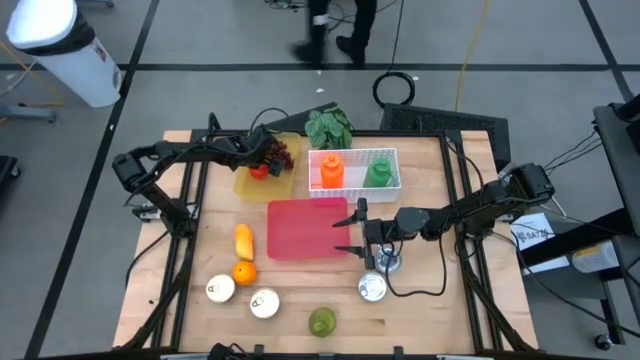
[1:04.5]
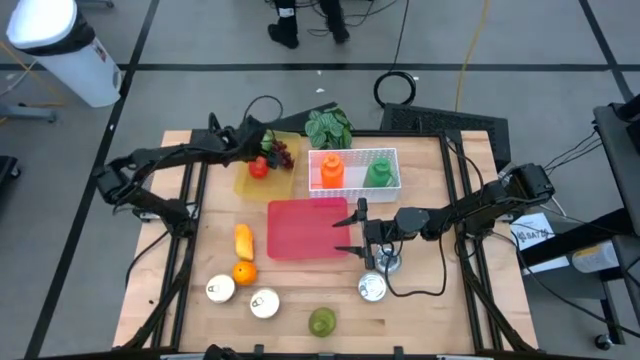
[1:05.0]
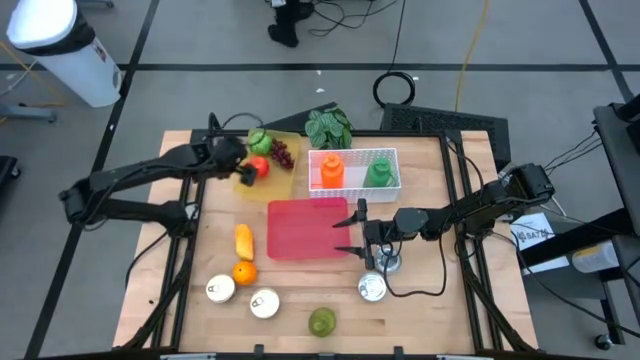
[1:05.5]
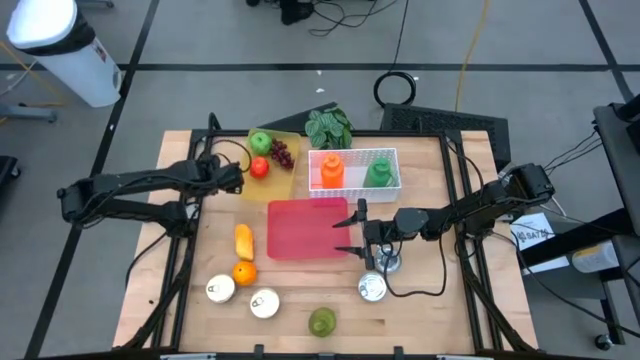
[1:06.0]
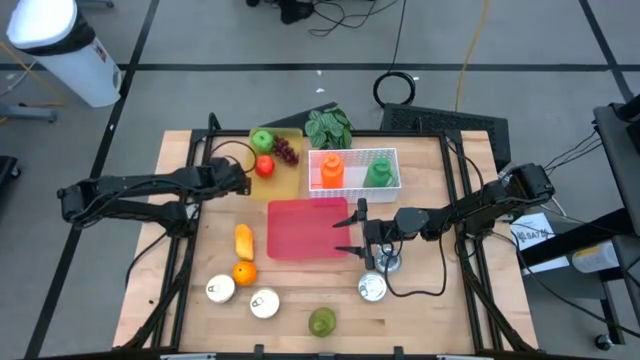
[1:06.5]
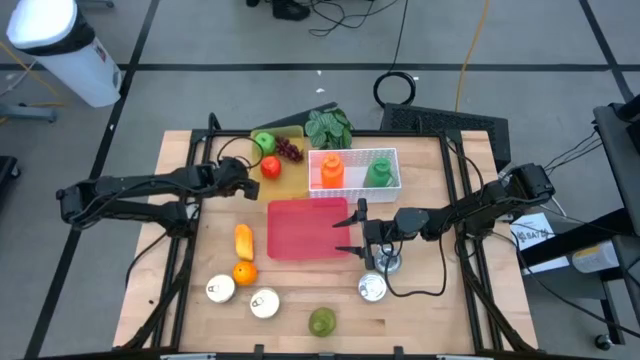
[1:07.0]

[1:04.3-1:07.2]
Task: Pick & Place Food Item
Adjust the yellow bin

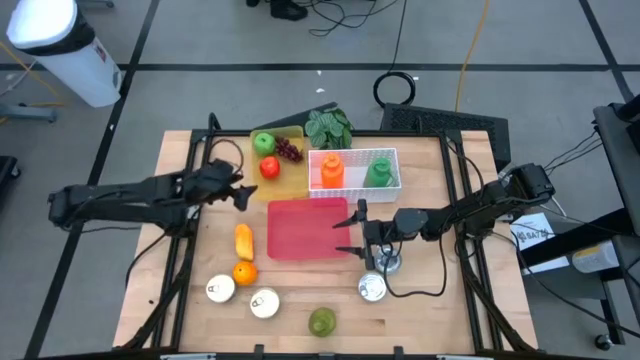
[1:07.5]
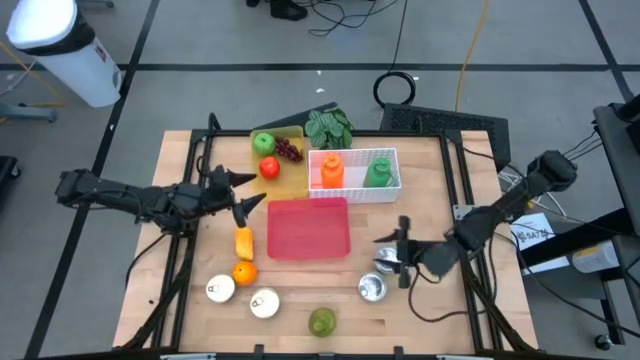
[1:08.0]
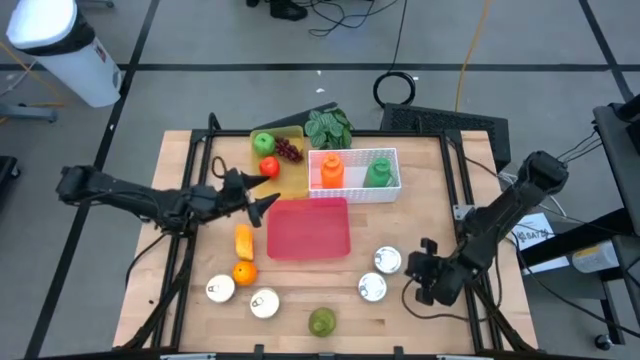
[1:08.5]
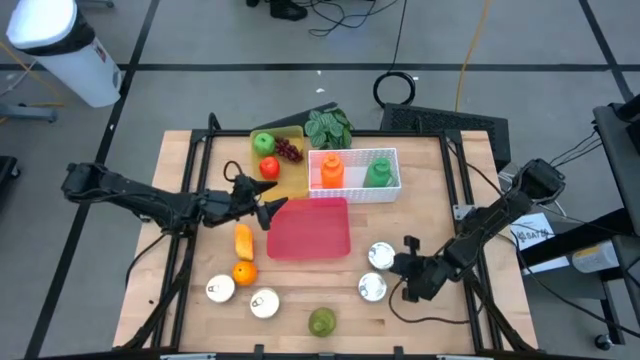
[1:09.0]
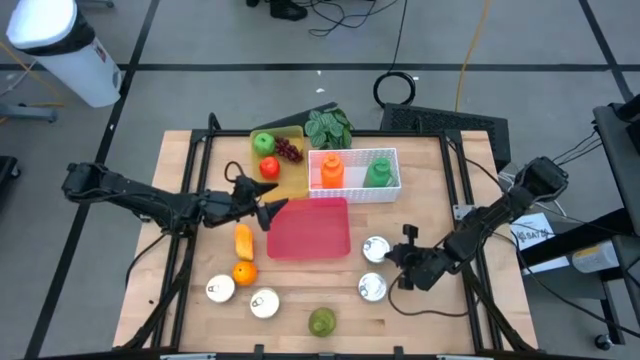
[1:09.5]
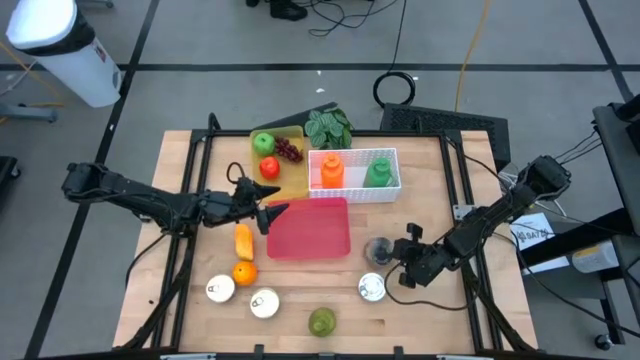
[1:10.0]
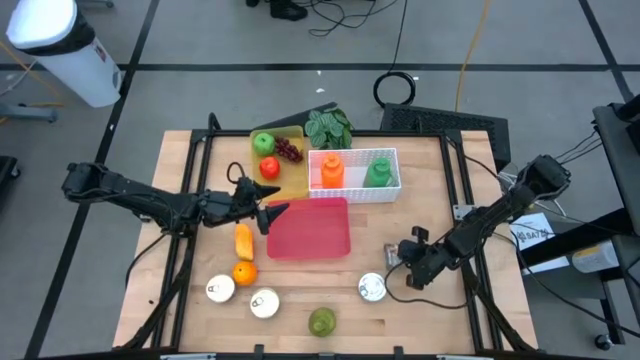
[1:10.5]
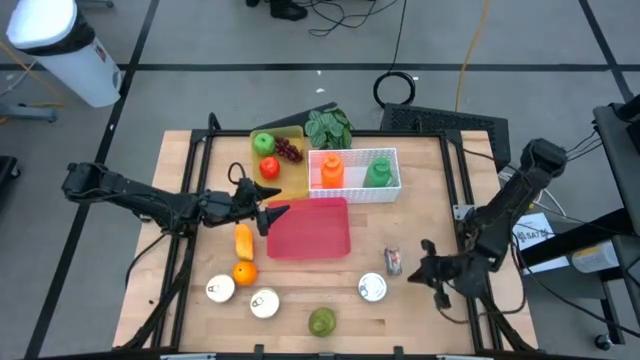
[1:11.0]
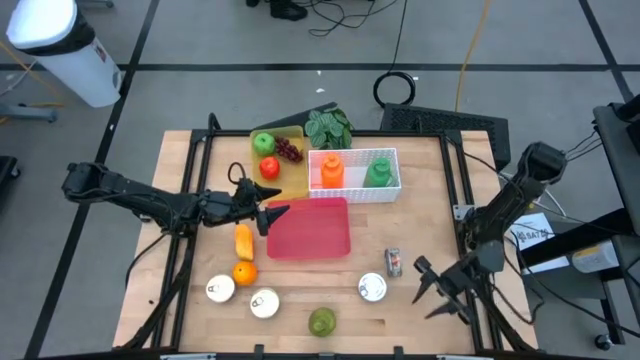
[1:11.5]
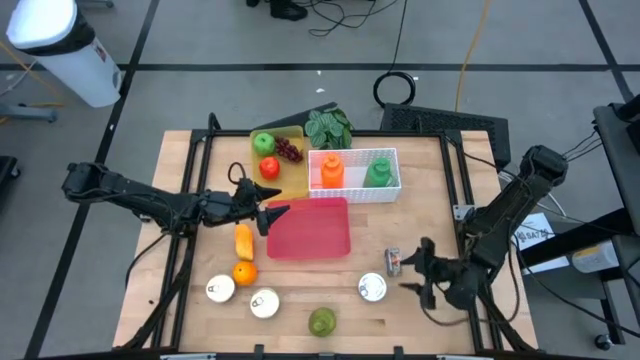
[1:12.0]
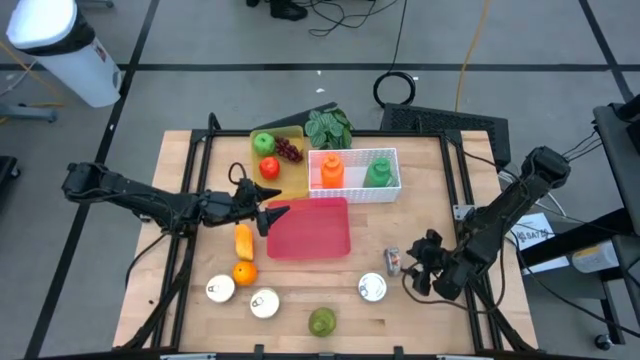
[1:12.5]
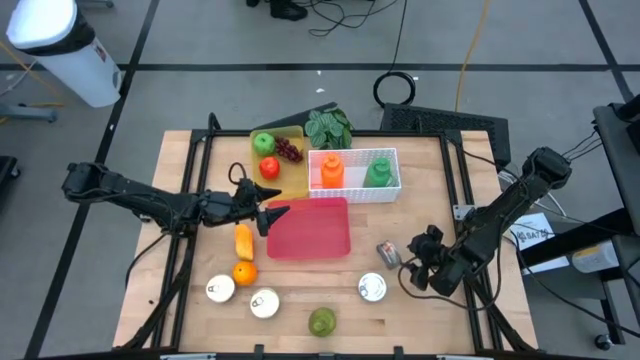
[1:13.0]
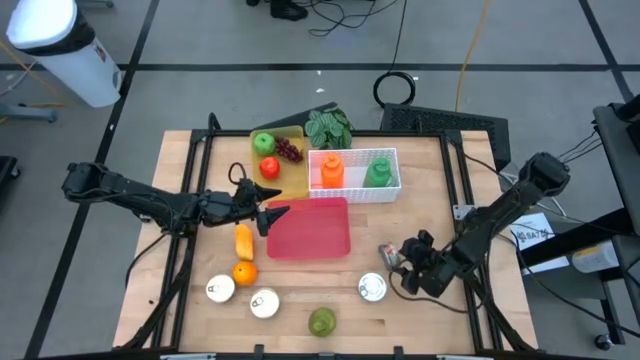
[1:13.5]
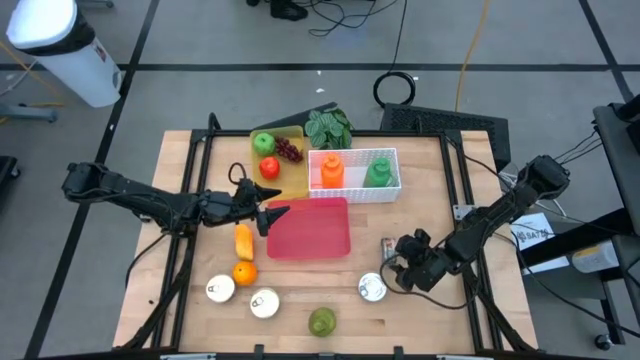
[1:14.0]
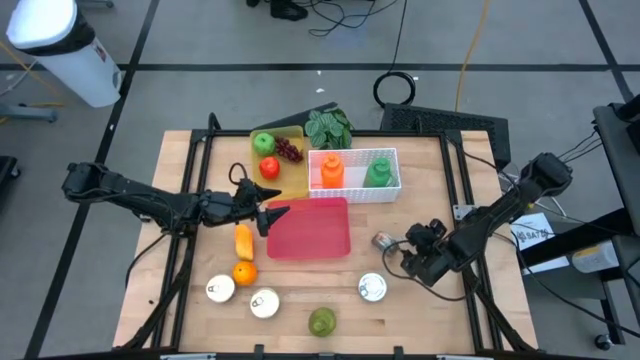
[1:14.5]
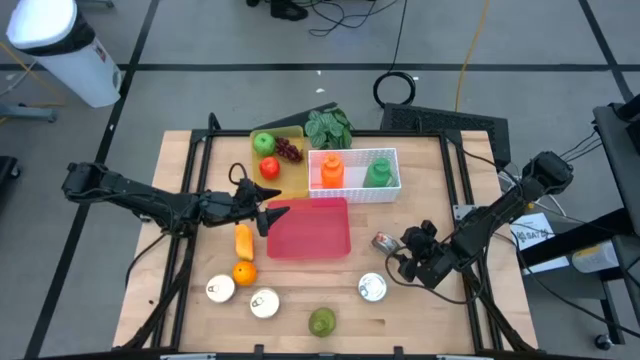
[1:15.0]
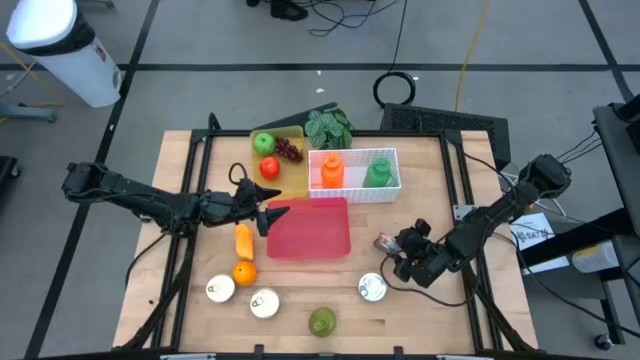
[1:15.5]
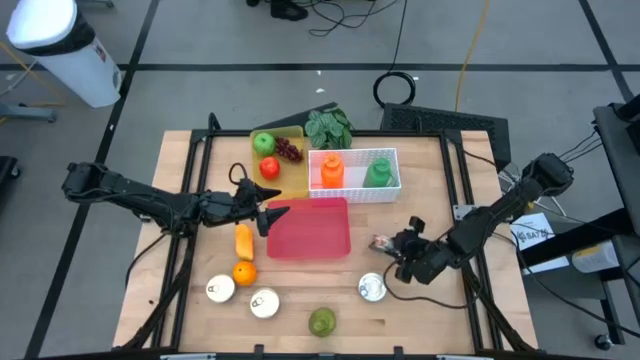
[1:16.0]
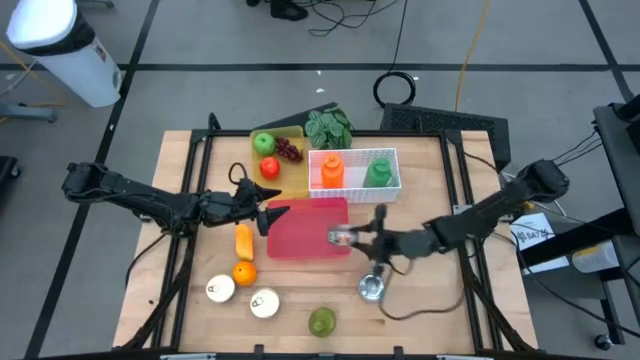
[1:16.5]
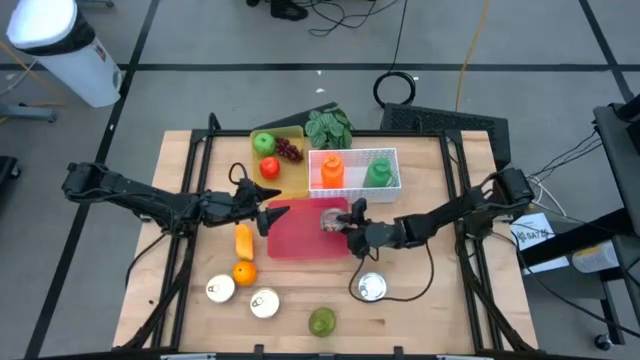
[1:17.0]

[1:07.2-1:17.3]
Put the top green tuna can in the pink bin

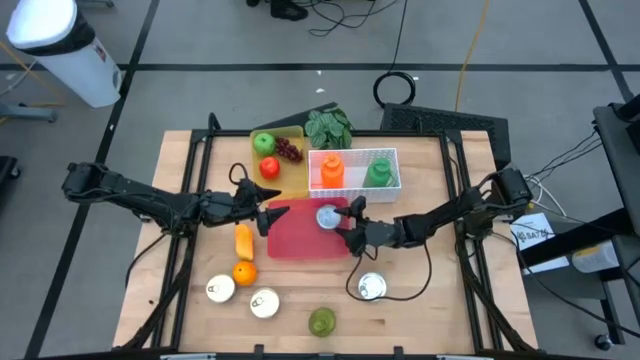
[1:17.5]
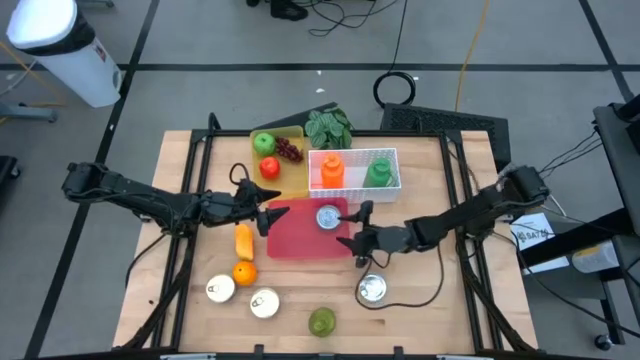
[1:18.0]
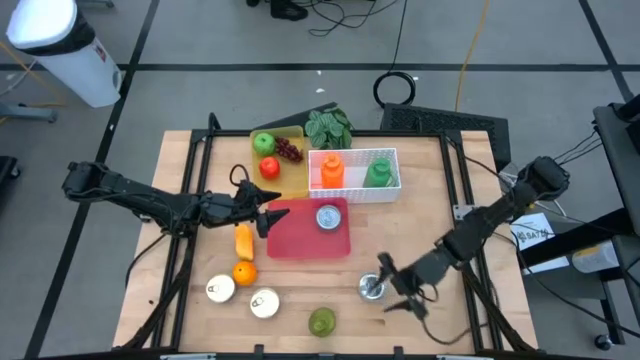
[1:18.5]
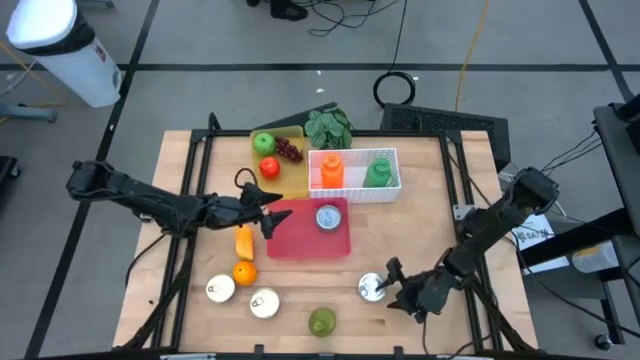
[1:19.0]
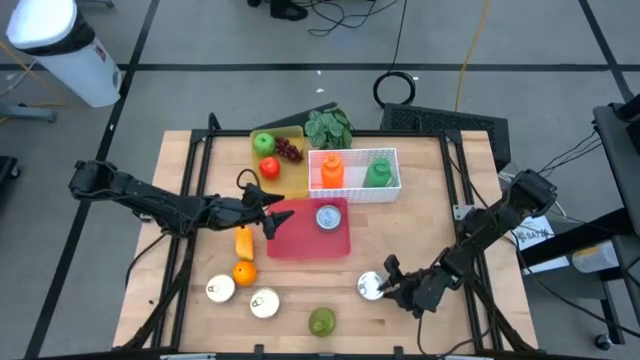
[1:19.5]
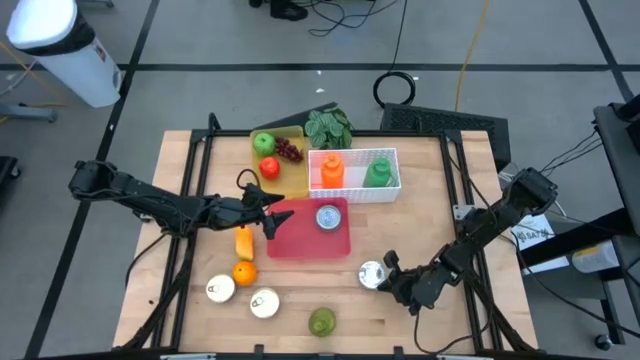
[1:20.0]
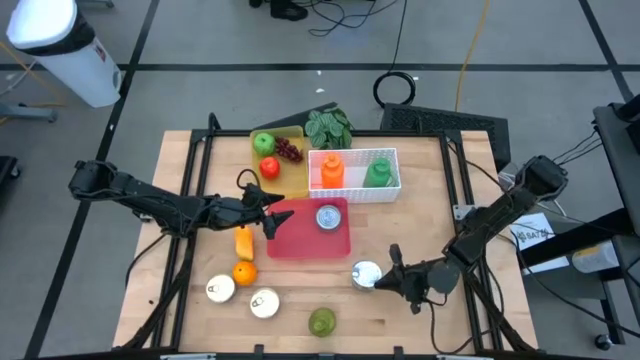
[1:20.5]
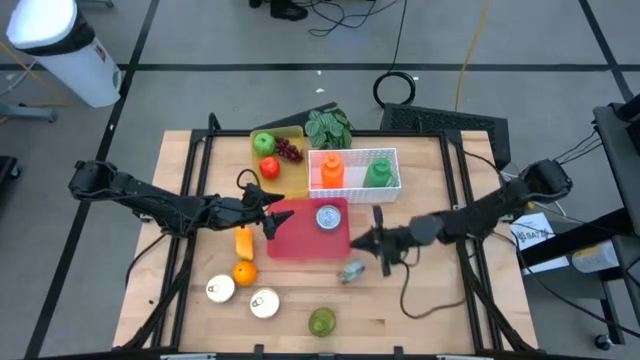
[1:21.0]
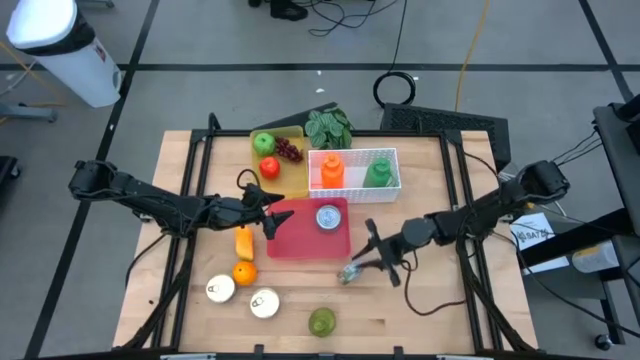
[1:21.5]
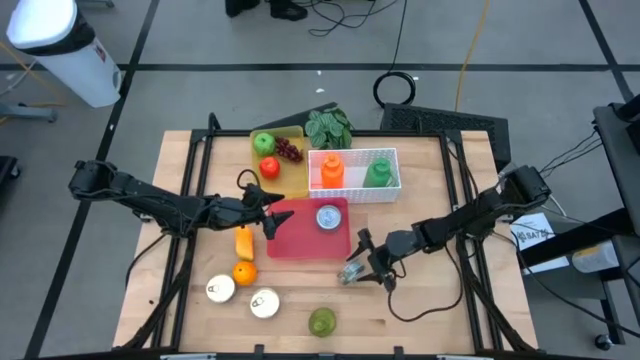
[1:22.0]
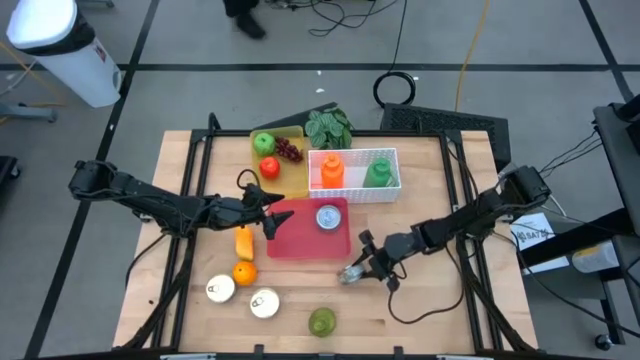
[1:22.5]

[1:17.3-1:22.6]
Put the green tuna can in the pink bin

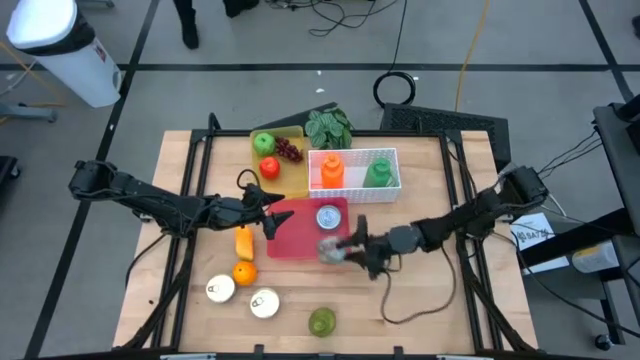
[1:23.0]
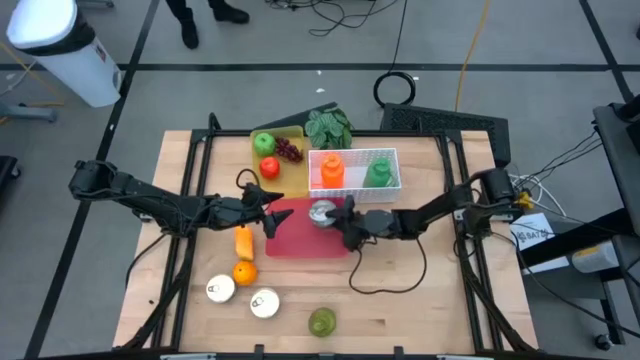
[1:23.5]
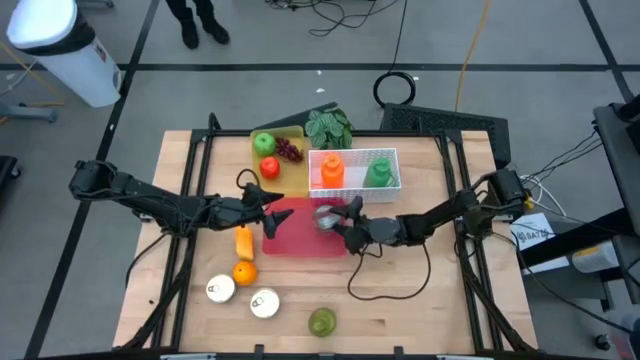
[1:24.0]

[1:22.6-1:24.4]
Put the green tuna can in the pink bin

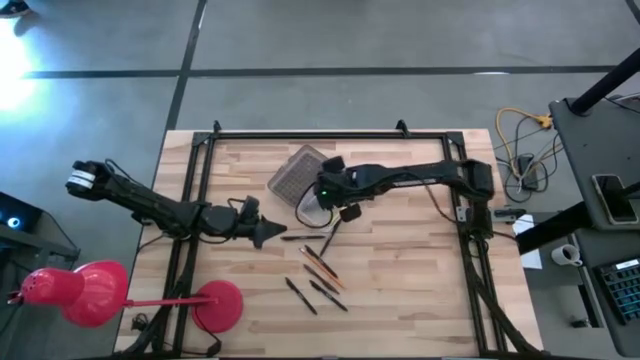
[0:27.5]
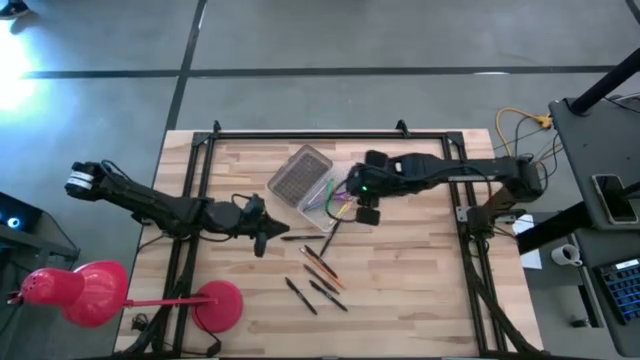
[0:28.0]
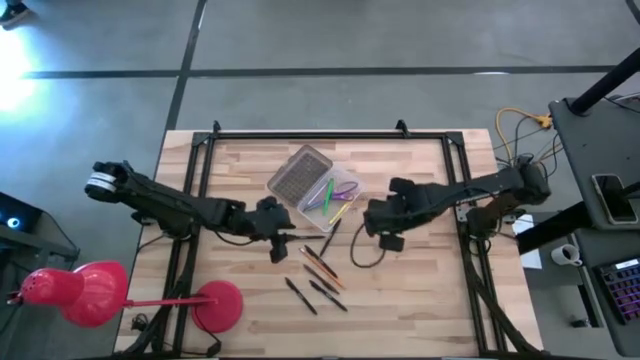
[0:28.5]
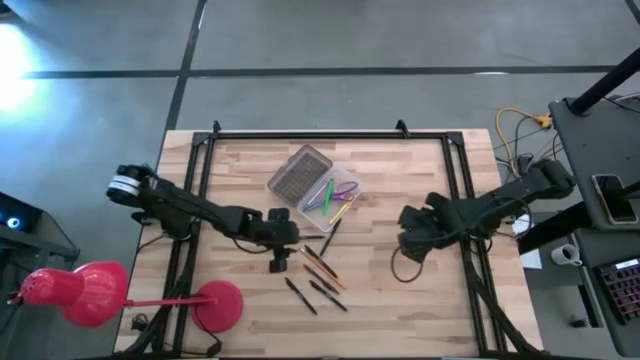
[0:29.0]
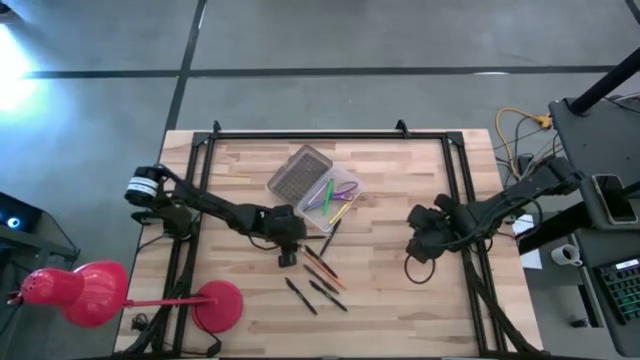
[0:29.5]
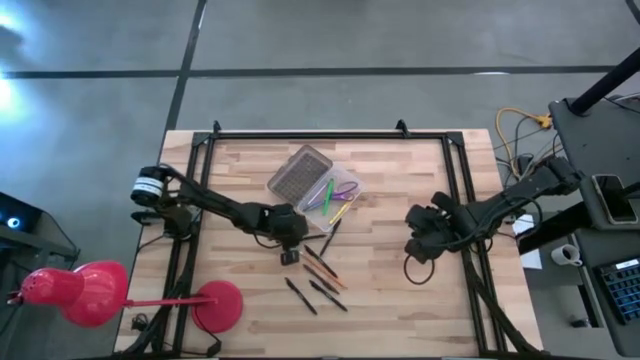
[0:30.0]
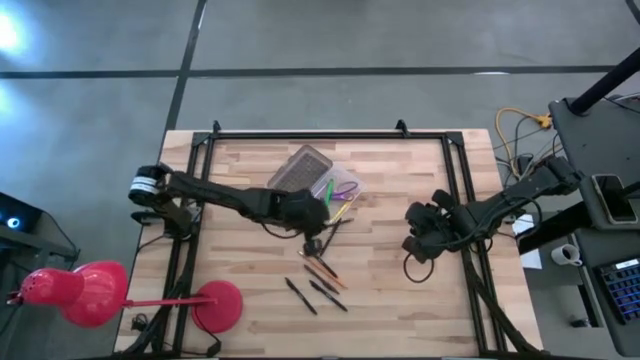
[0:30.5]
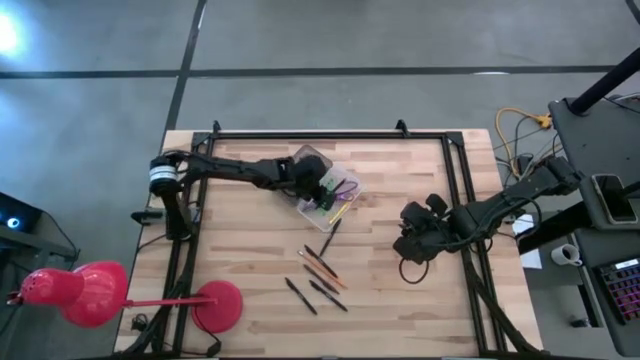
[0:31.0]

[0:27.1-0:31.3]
Task: Pick & place school supplies into a supply box
Put the black pen into the supply box
